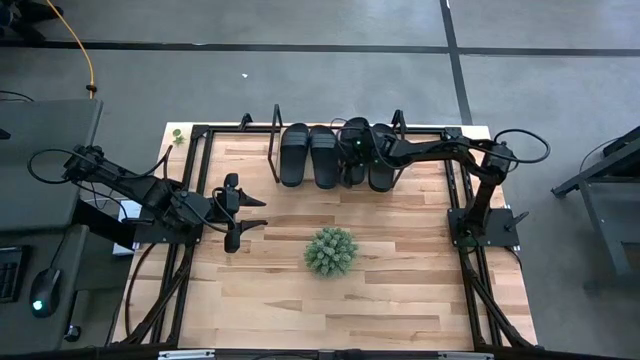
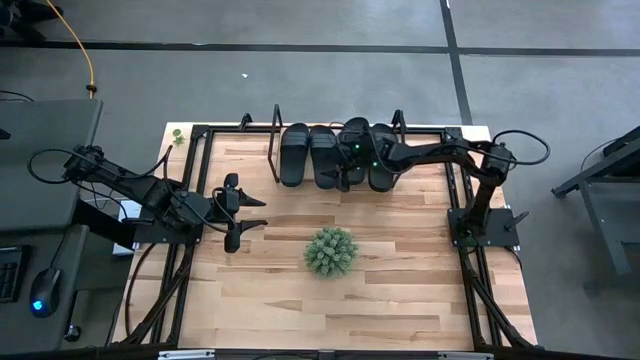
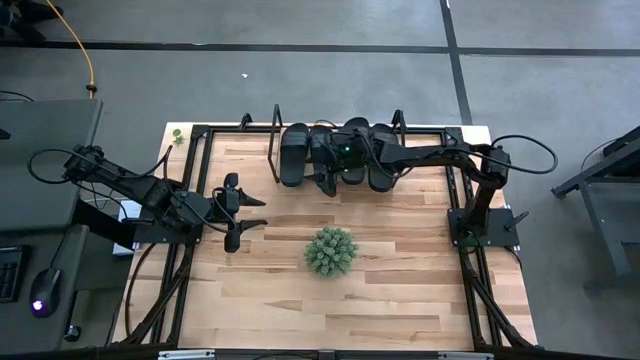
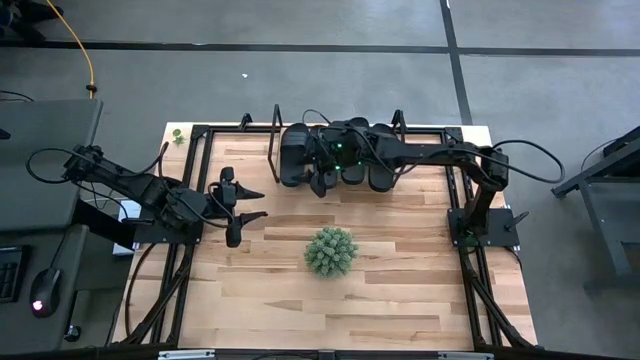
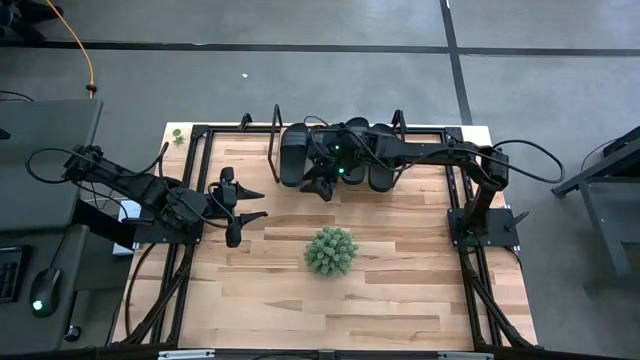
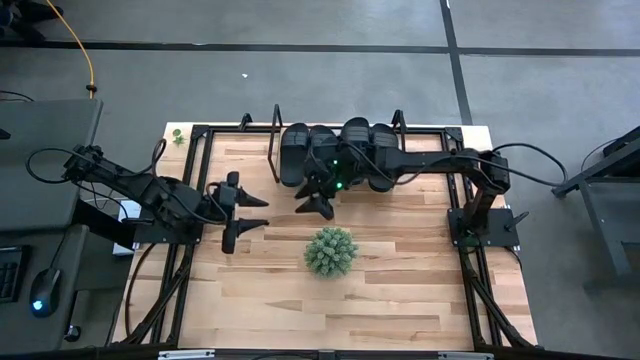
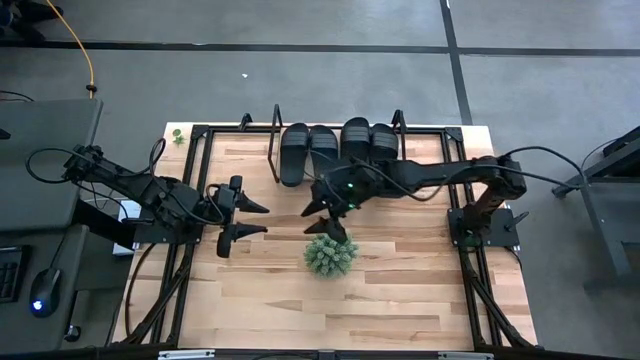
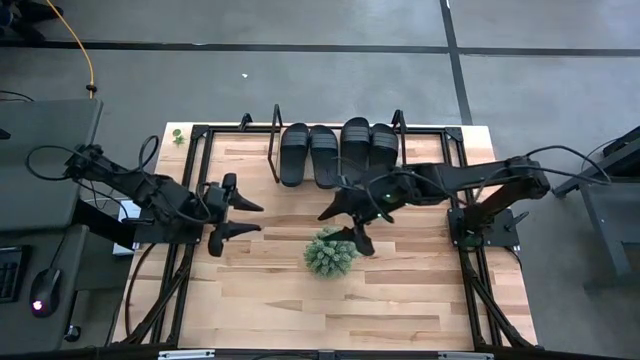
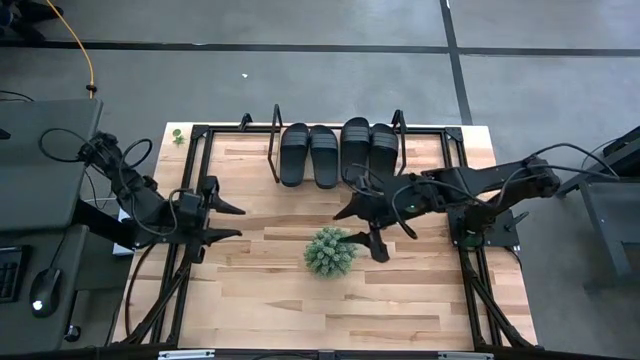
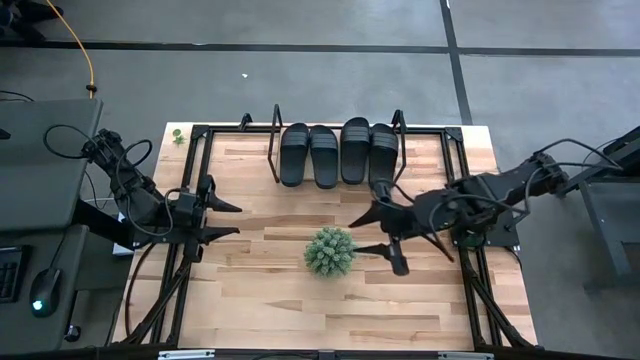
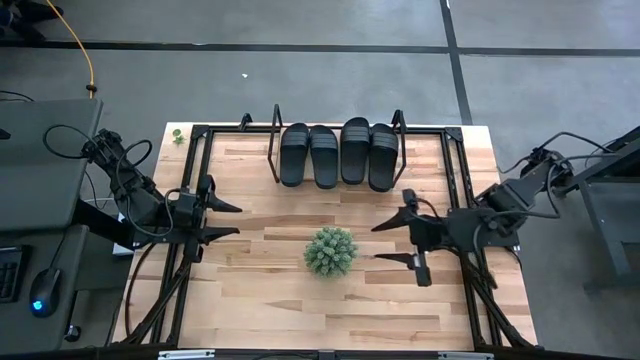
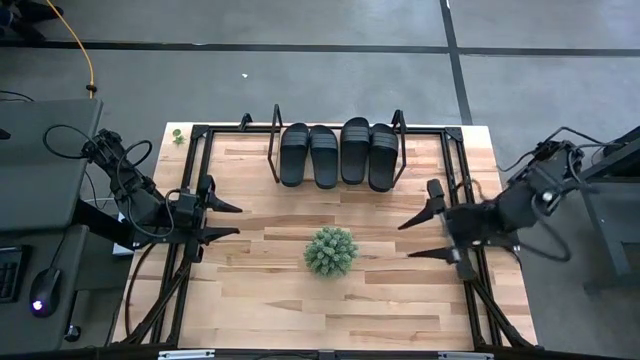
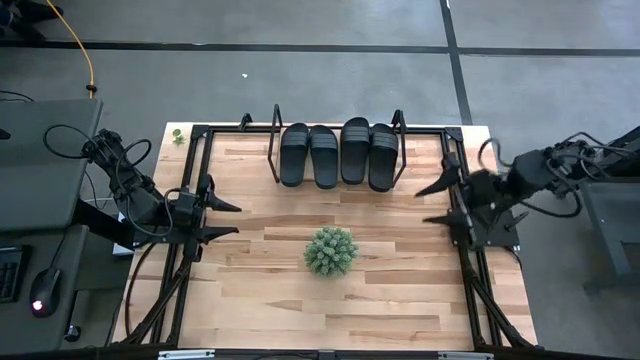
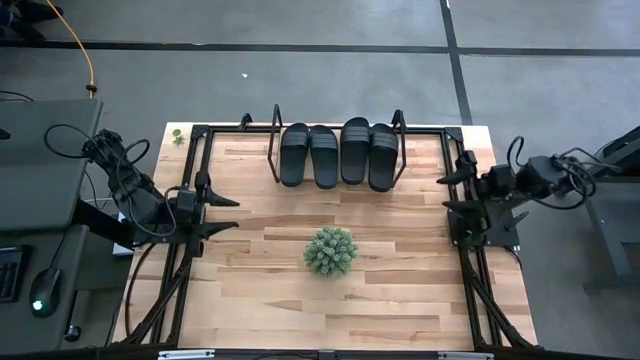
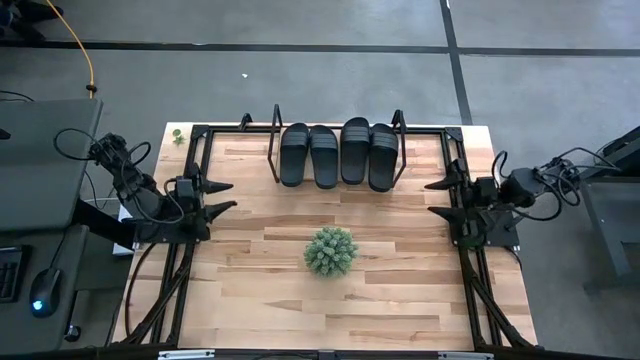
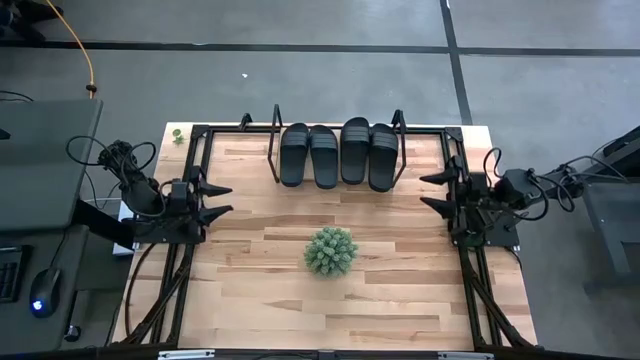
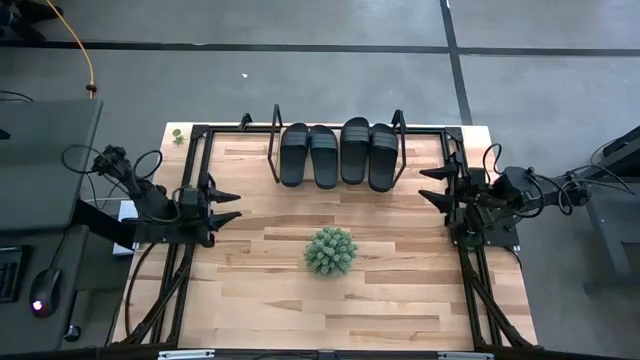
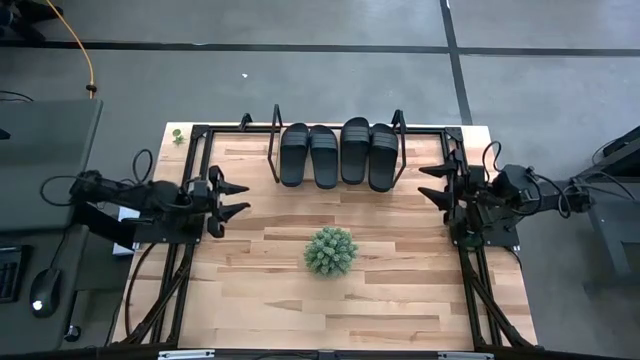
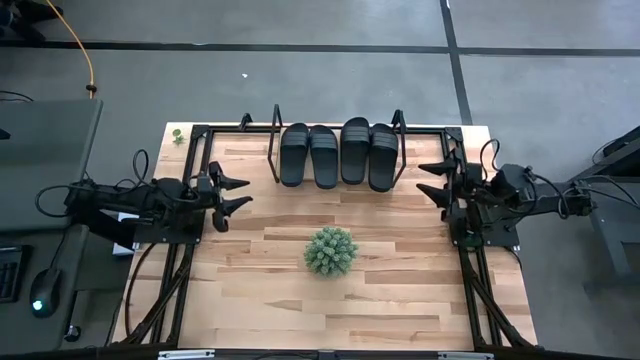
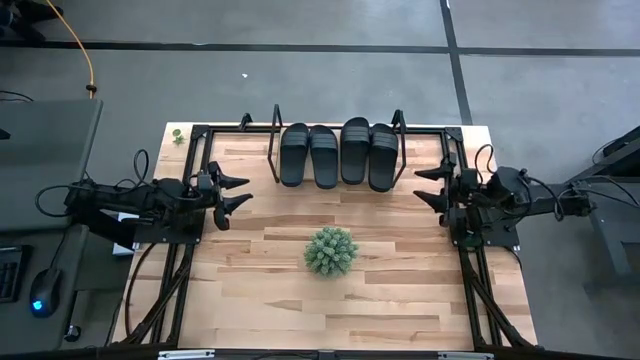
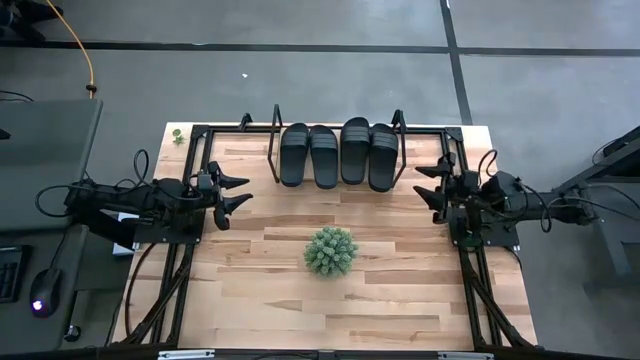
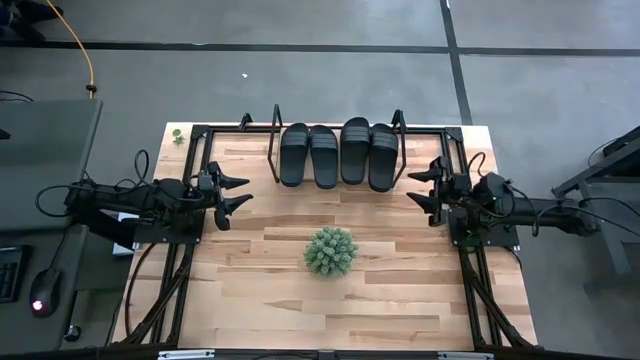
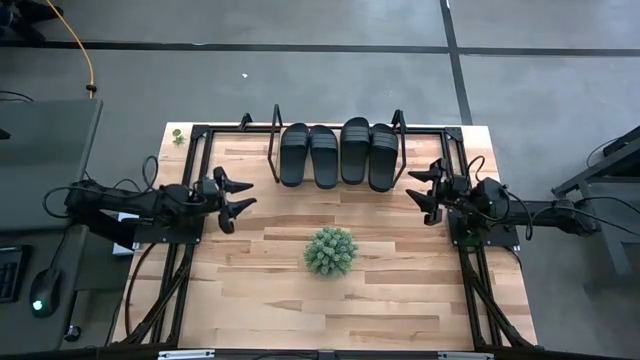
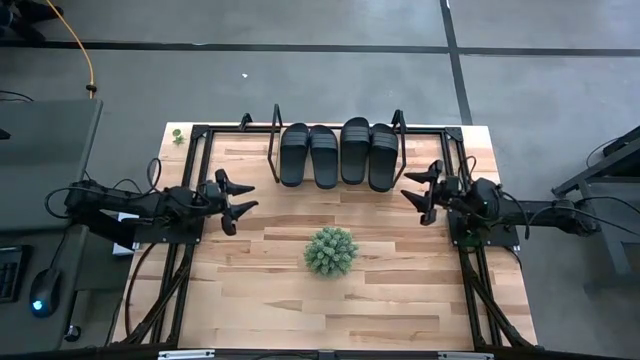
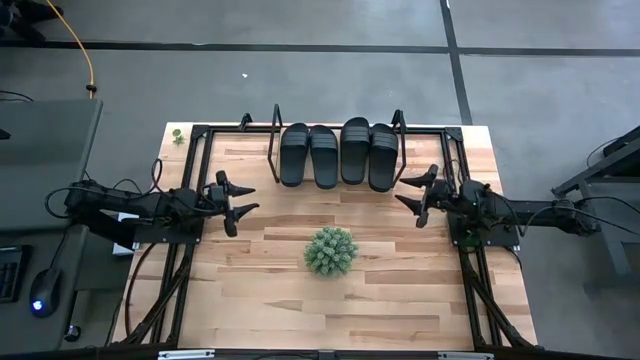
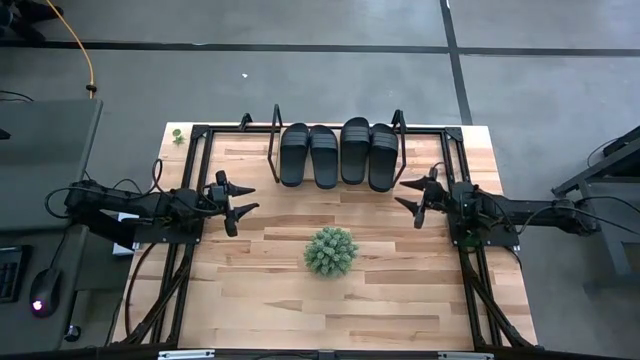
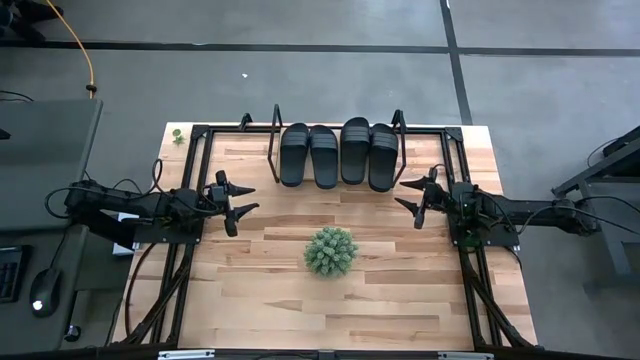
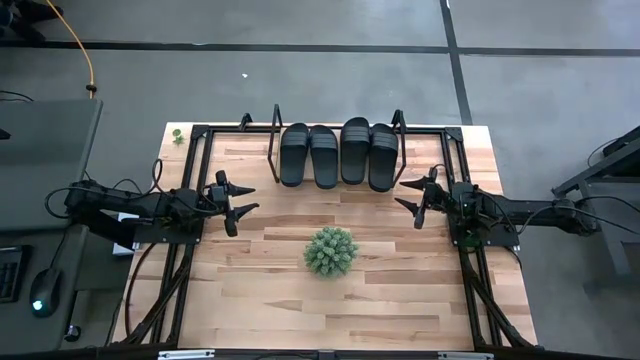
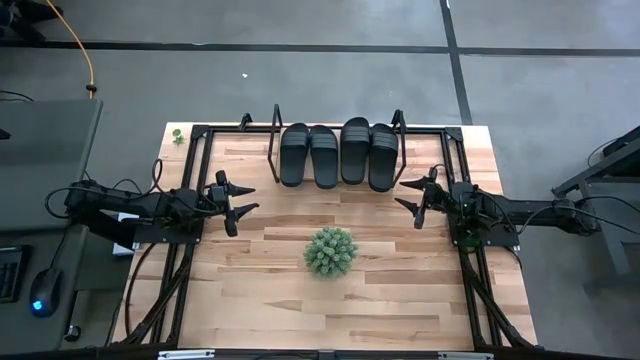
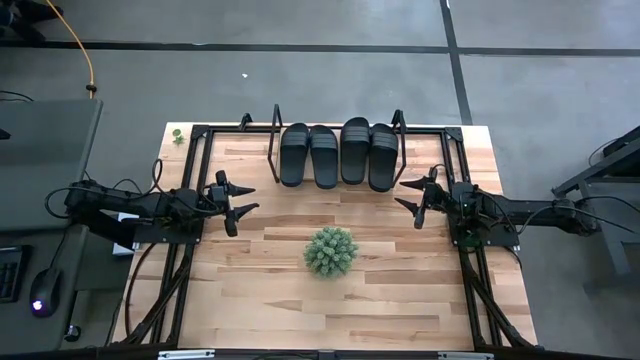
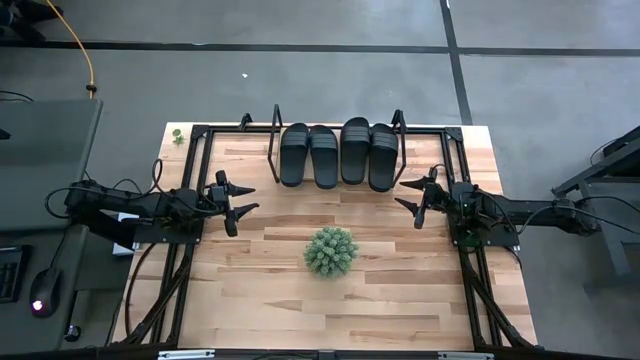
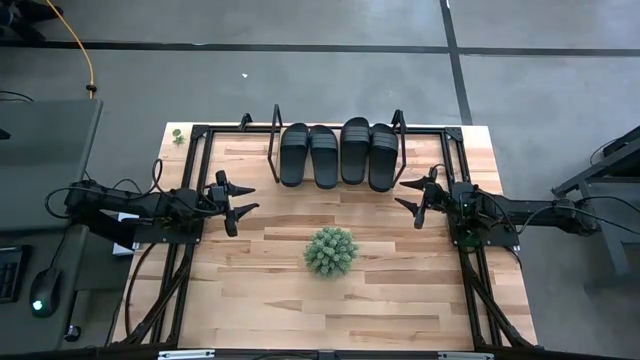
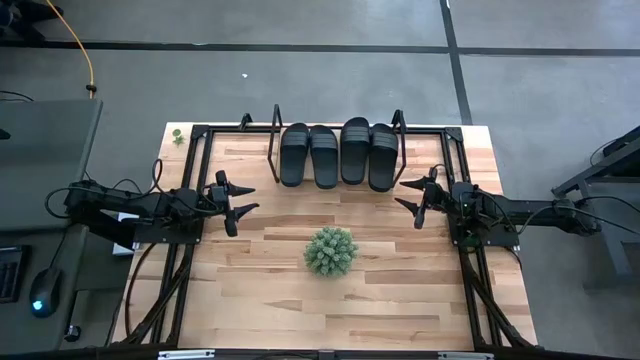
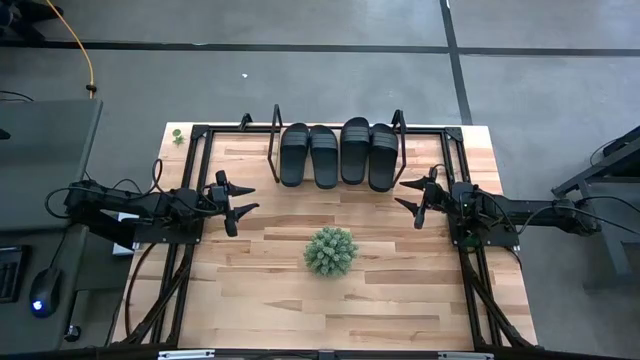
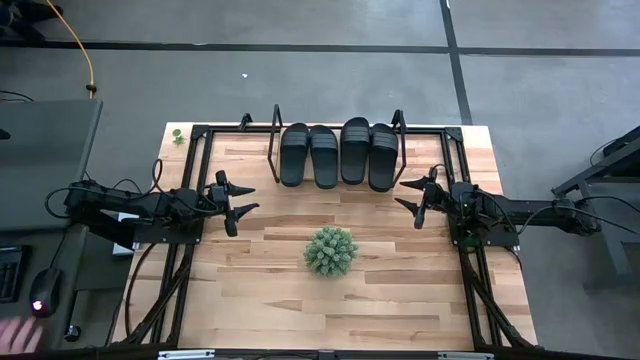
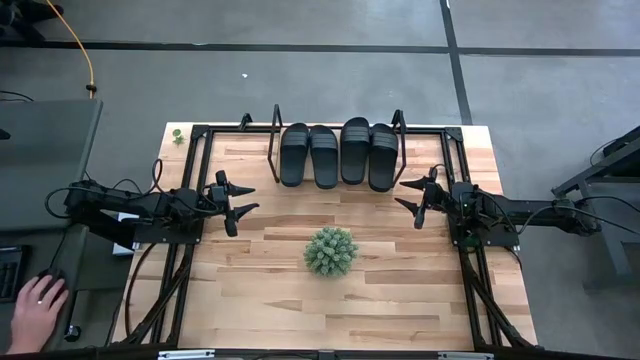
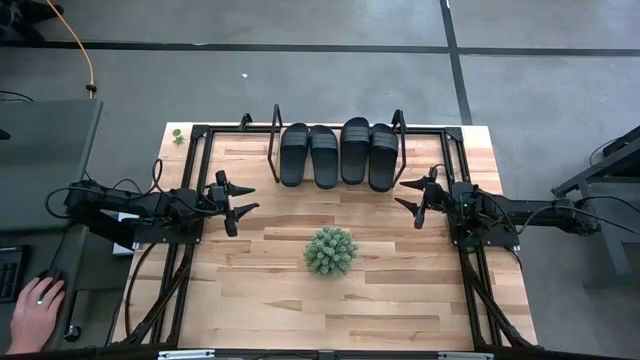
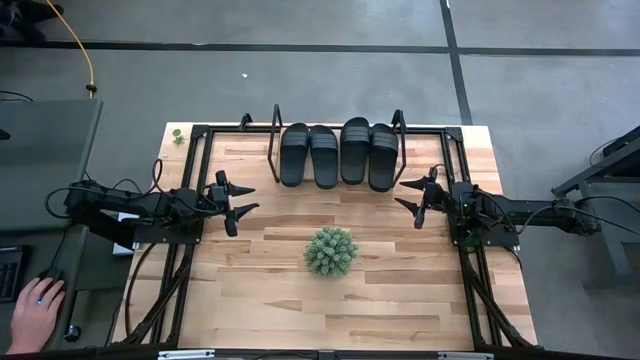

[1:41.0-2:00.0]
Task: Pick and place slides into the shelf
Return to Home Position

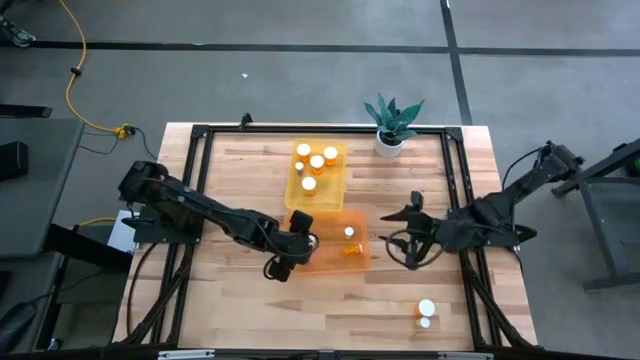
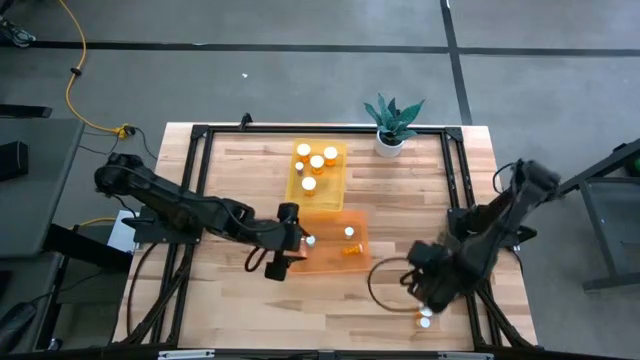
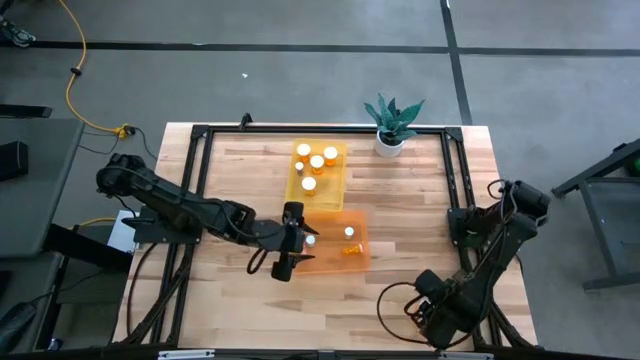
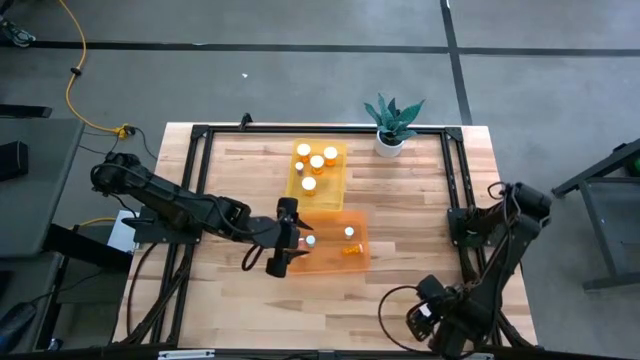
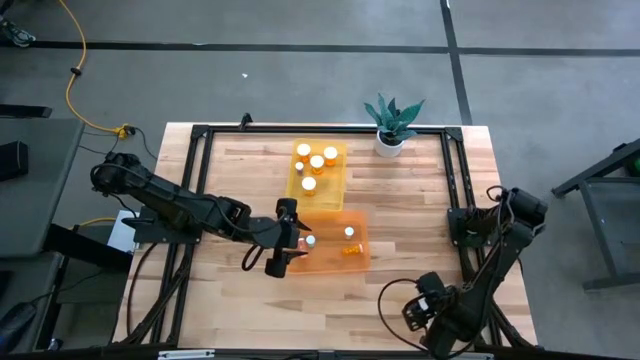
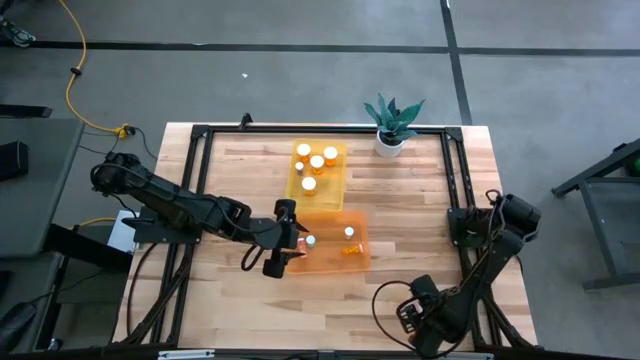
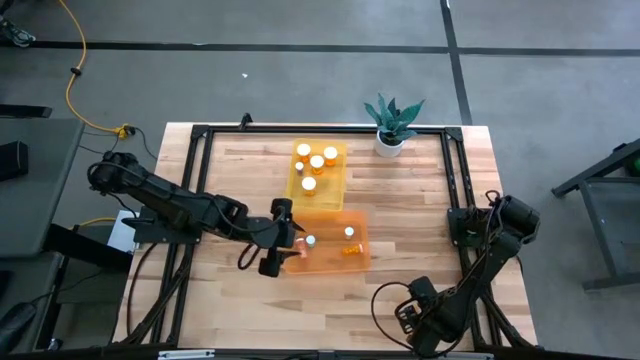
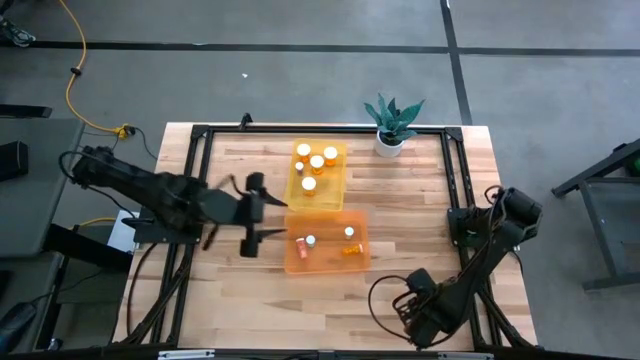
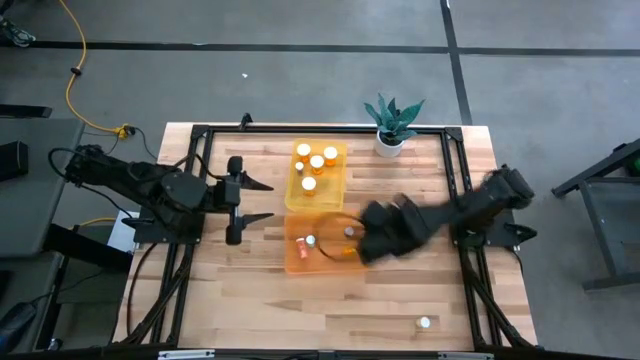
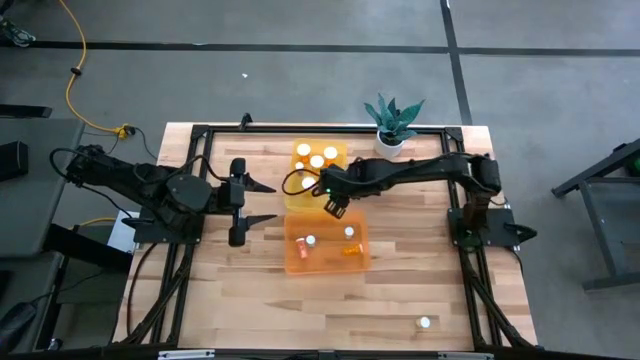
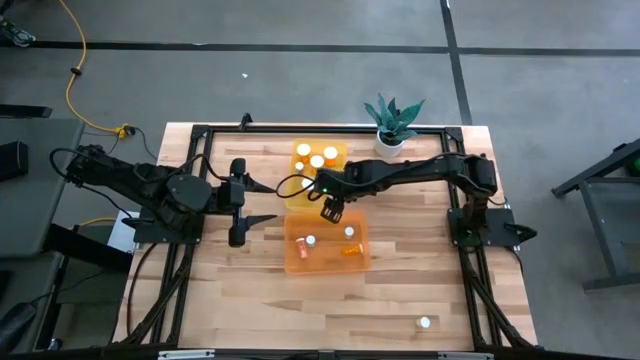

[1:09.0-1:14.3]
Task: Pick and place medicine bottles into bin by pill shape (circle, oval)
Put the orange capsule bottle into the yellow bin
